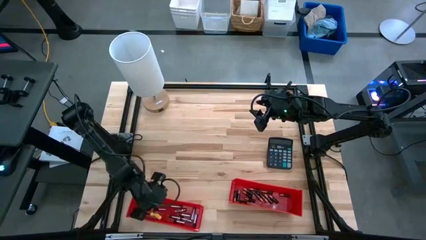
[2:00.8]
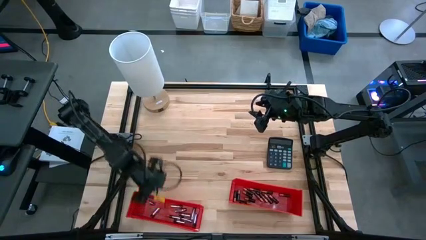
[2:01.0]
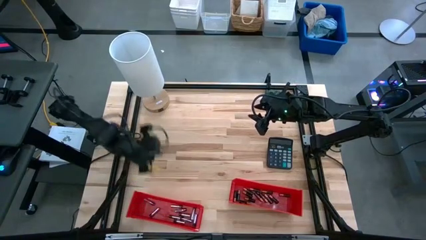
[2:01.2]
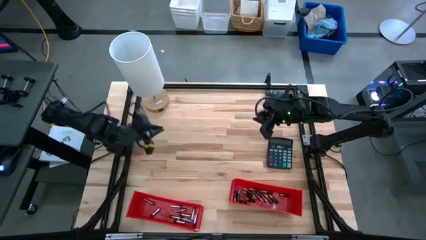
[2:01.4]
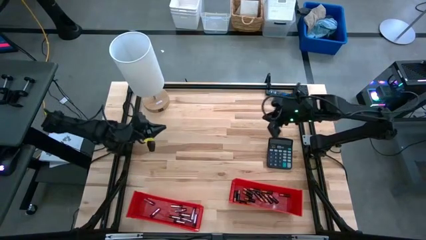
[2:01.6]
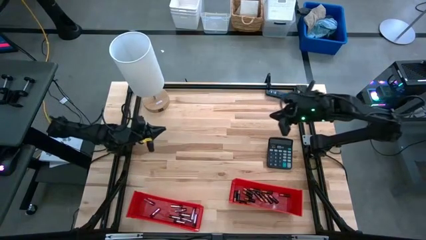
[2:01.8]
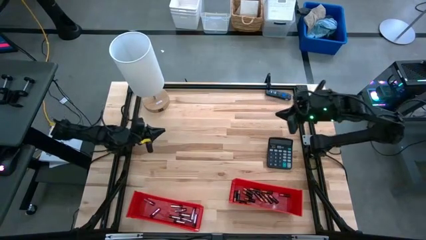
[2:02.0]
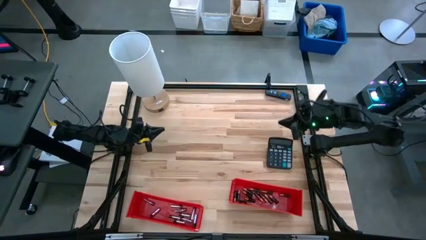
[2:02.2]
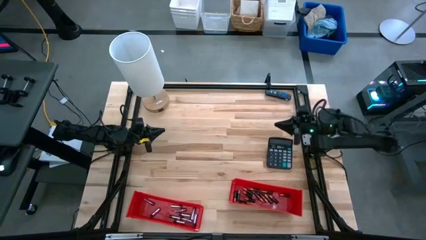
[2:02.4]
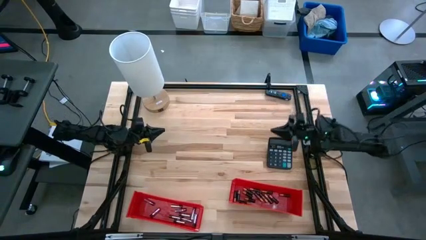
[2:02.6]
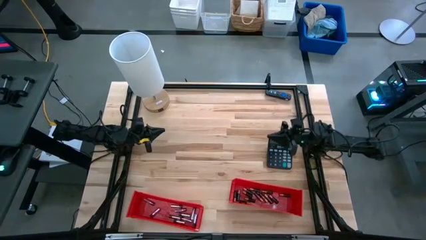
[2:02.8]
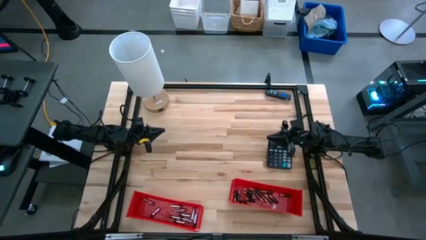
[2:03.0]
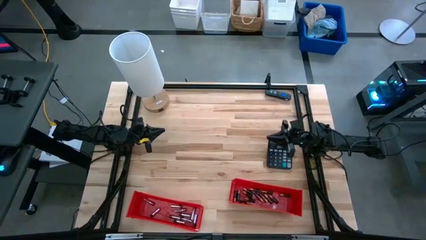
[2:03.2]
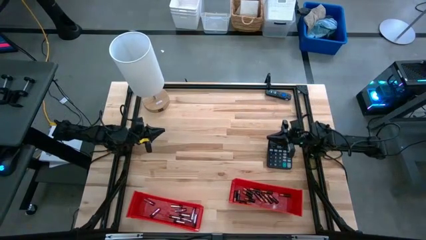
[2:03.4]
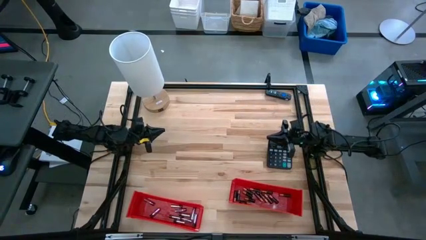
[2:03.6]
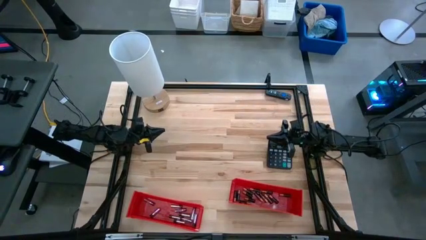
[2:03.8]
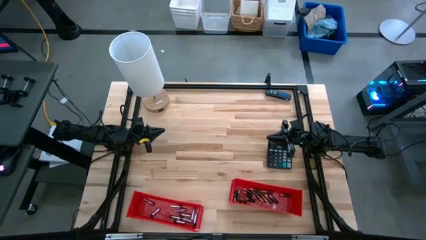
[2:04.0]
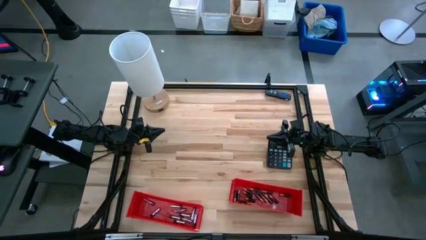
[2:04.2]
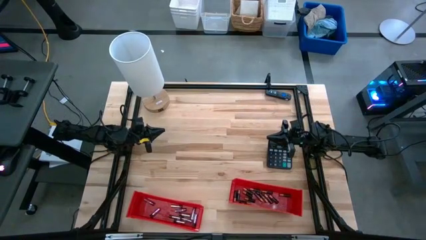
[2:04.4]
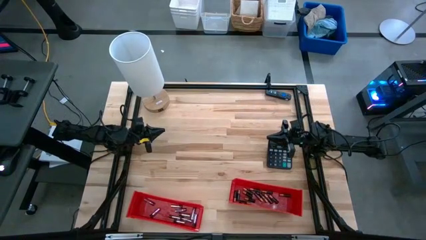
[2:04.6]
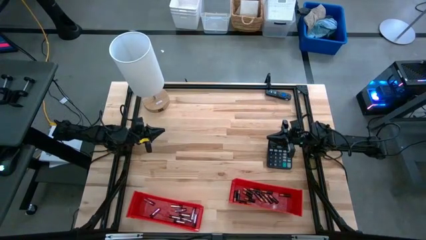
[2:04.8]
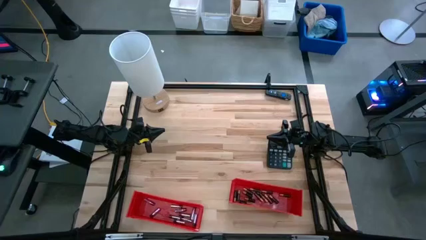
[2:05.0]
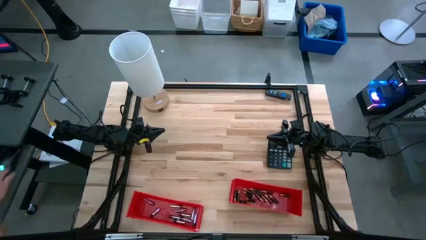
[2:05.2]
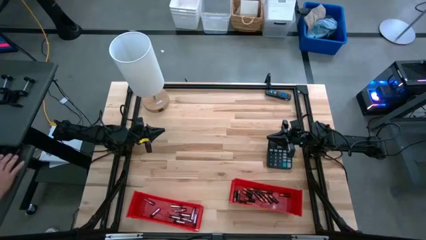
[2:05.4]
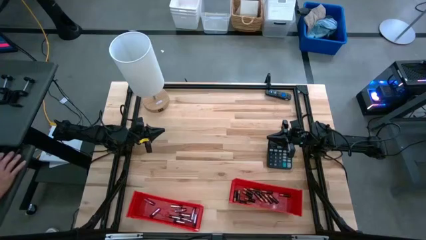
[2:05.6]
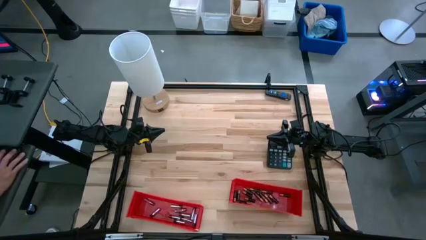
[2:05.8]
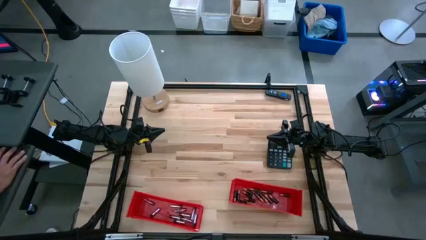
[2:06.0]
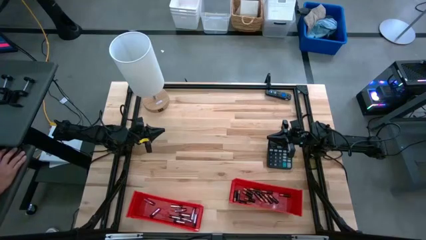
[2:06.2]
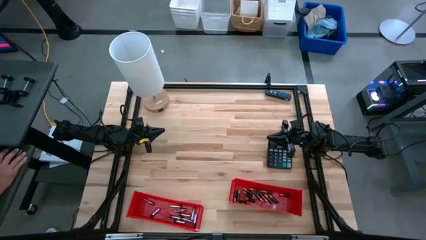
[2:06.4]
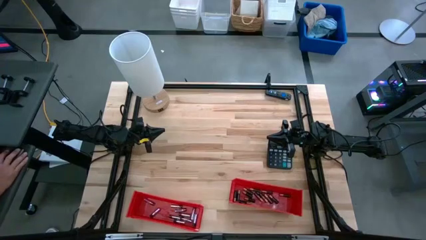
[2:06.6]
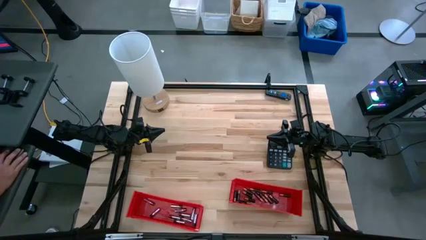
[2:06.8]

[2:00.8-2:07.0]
Task: Sort batteries
Return to Home Position

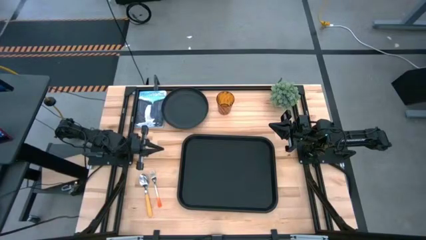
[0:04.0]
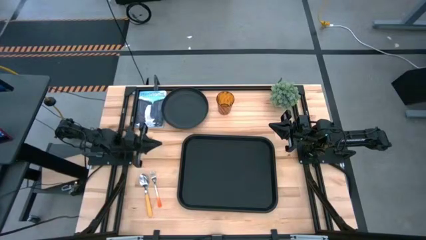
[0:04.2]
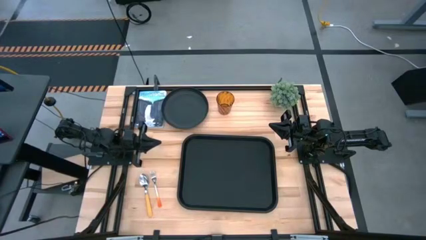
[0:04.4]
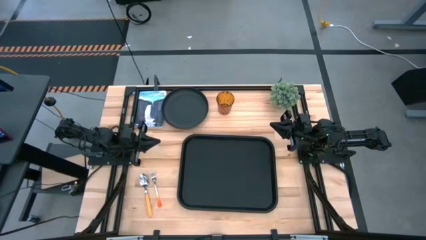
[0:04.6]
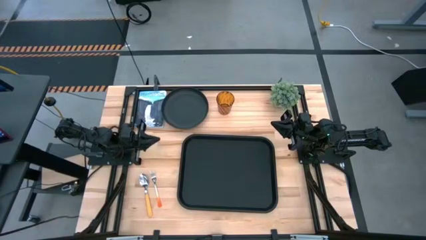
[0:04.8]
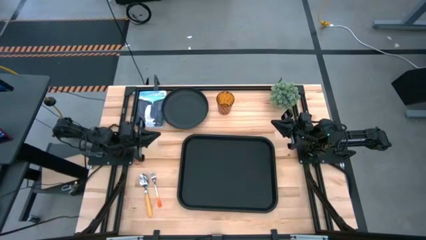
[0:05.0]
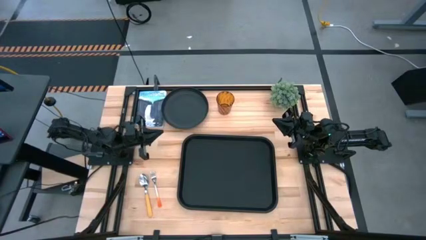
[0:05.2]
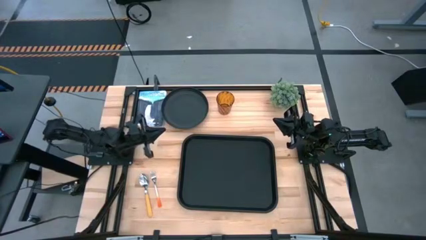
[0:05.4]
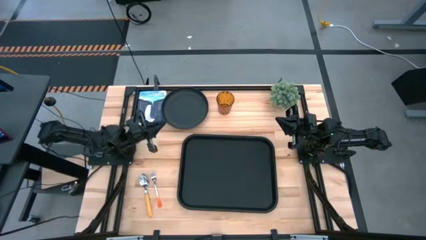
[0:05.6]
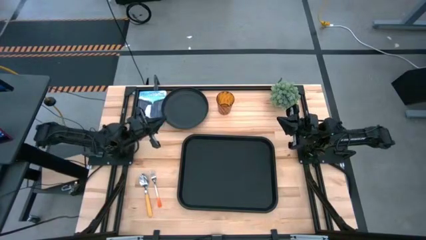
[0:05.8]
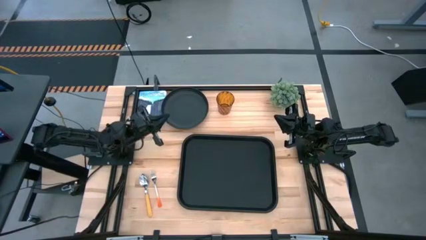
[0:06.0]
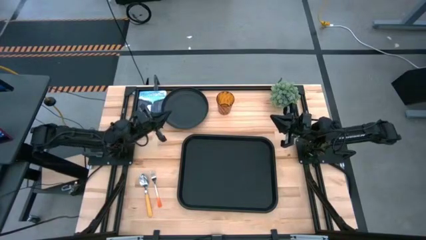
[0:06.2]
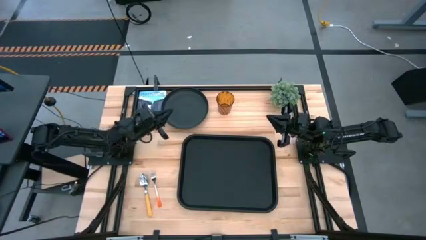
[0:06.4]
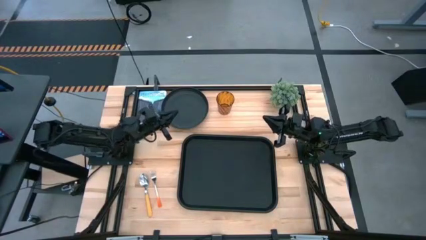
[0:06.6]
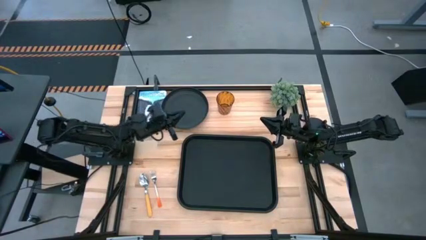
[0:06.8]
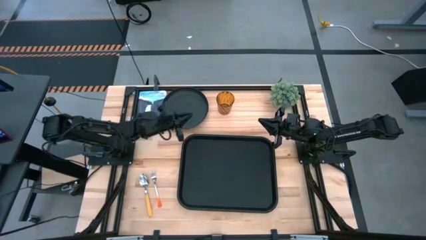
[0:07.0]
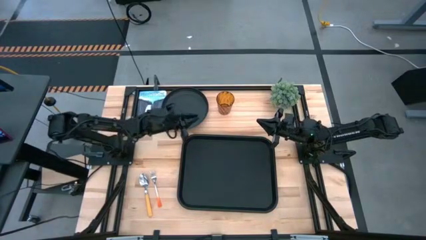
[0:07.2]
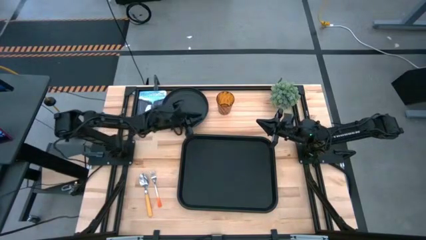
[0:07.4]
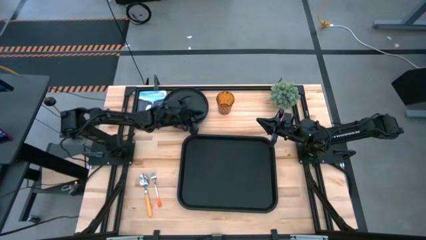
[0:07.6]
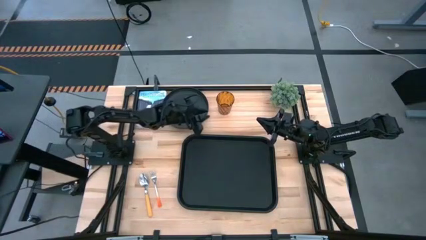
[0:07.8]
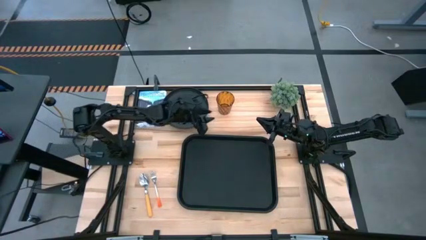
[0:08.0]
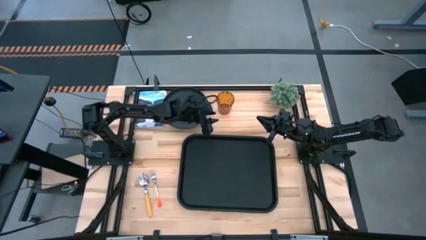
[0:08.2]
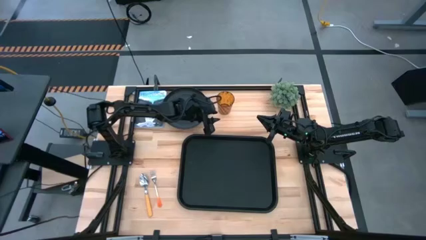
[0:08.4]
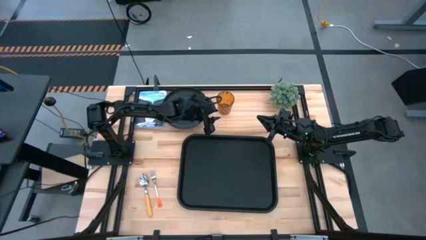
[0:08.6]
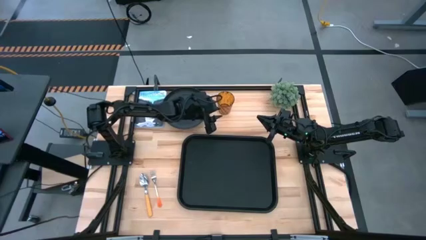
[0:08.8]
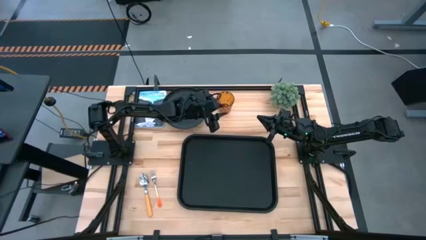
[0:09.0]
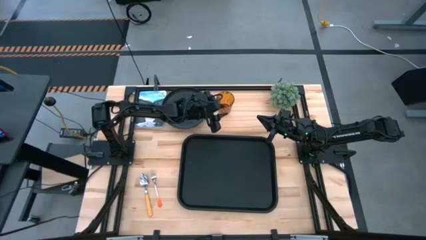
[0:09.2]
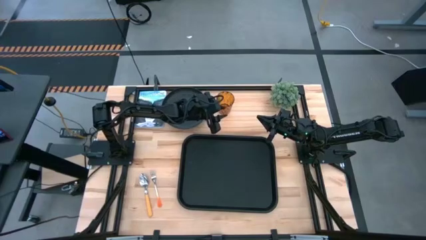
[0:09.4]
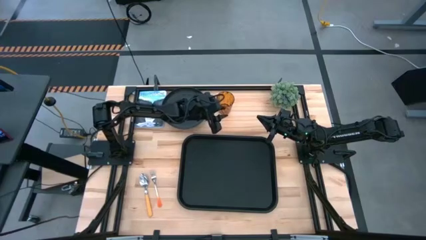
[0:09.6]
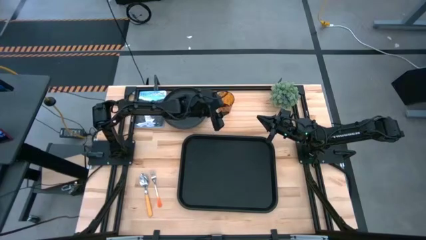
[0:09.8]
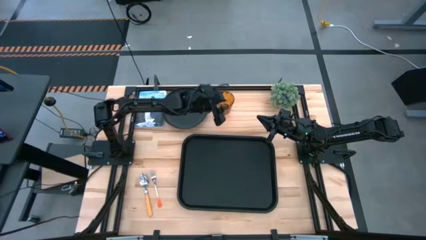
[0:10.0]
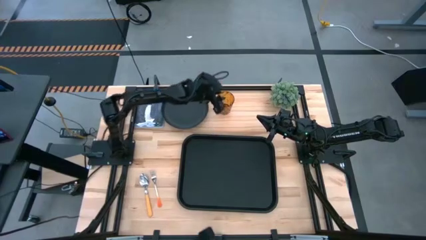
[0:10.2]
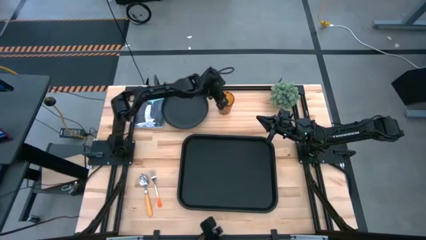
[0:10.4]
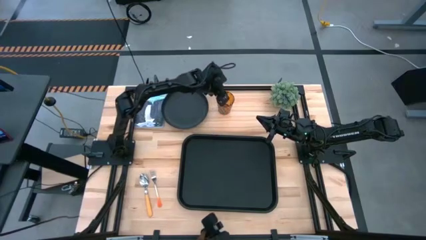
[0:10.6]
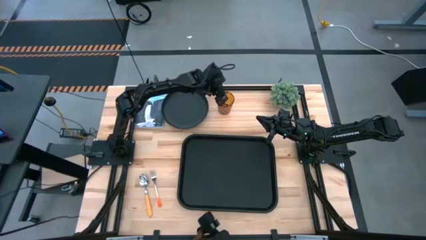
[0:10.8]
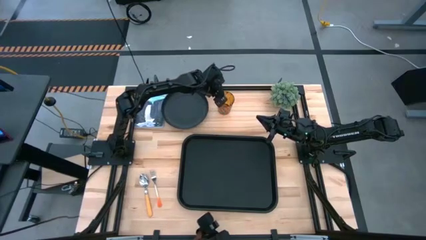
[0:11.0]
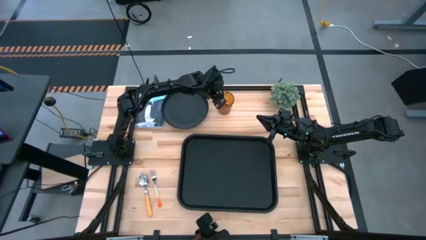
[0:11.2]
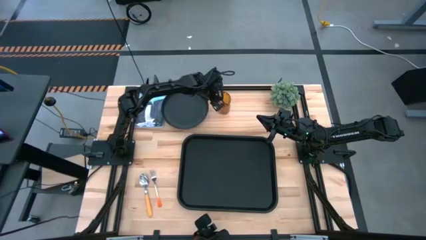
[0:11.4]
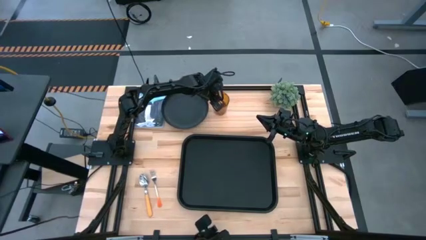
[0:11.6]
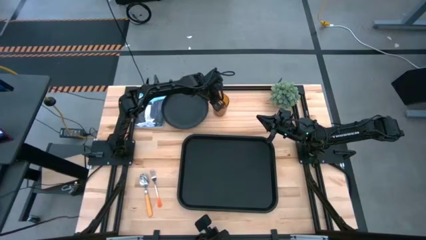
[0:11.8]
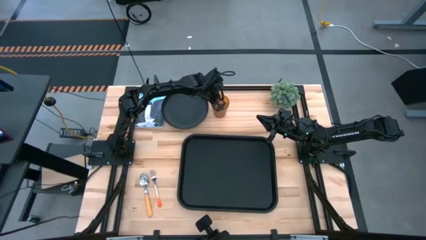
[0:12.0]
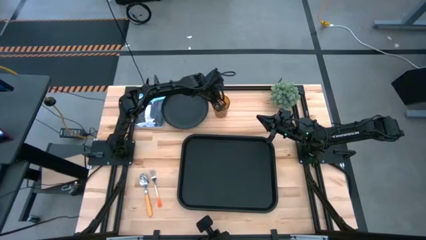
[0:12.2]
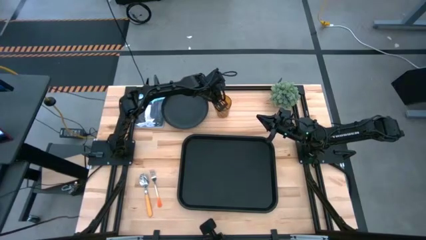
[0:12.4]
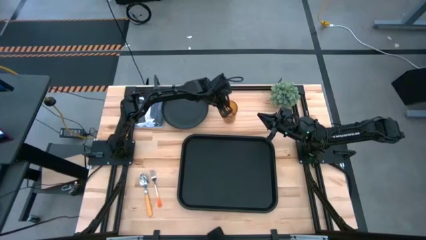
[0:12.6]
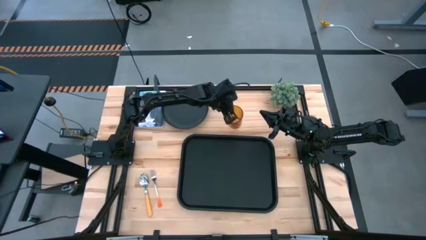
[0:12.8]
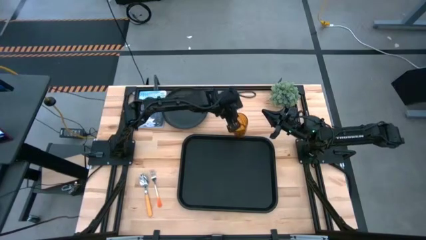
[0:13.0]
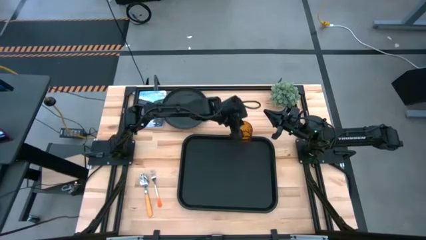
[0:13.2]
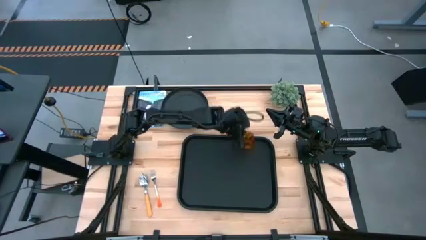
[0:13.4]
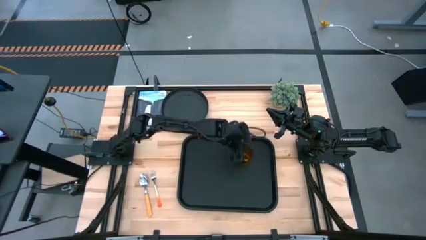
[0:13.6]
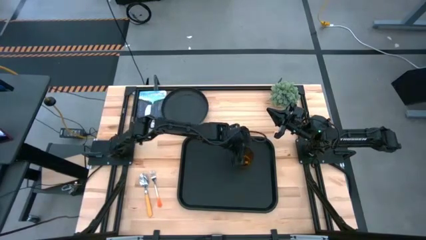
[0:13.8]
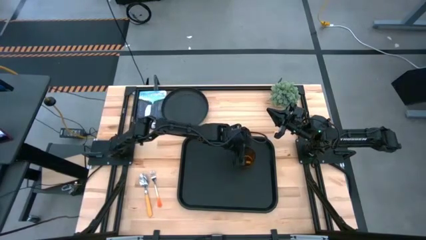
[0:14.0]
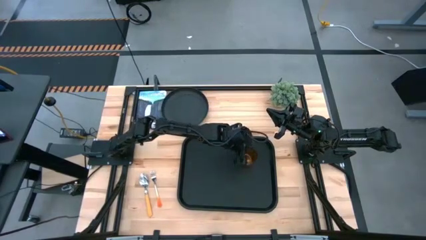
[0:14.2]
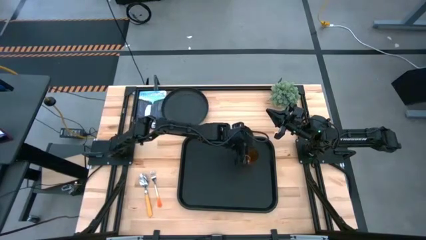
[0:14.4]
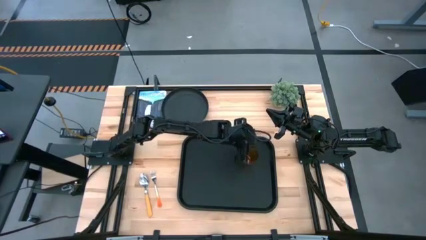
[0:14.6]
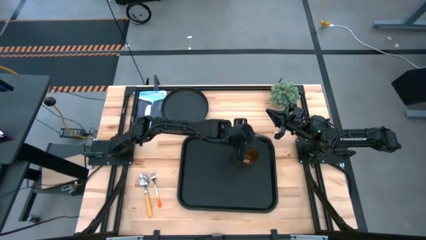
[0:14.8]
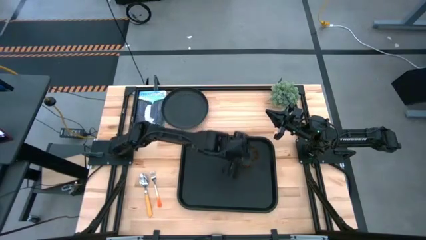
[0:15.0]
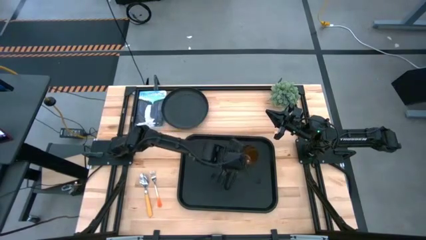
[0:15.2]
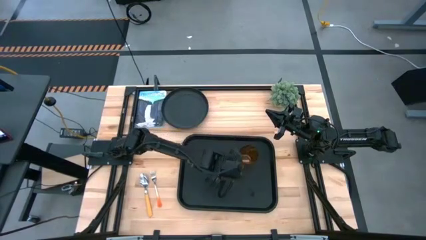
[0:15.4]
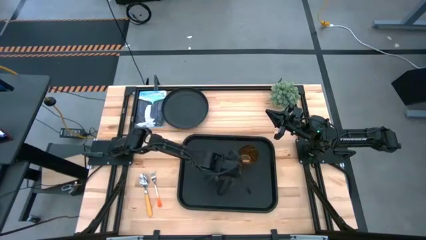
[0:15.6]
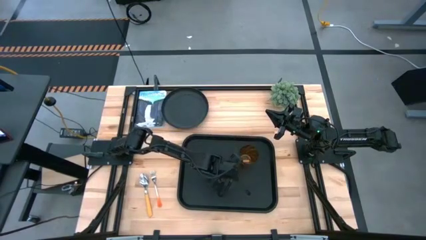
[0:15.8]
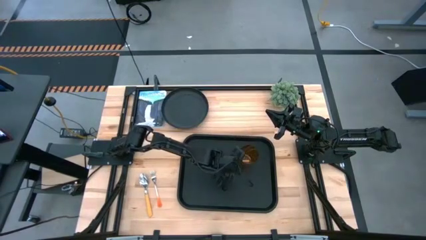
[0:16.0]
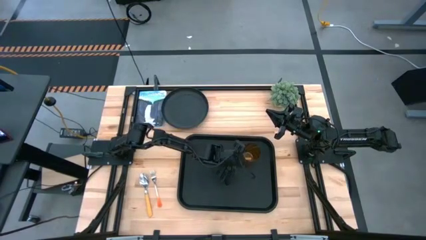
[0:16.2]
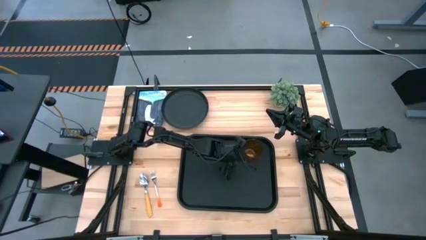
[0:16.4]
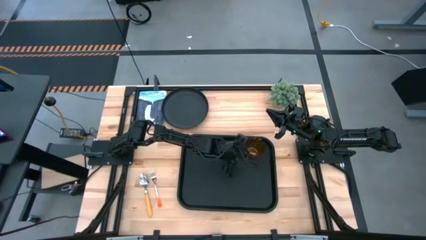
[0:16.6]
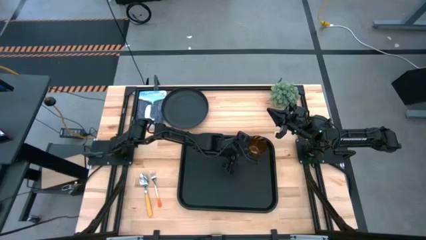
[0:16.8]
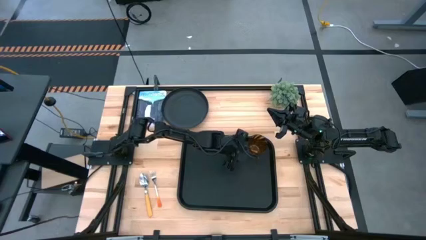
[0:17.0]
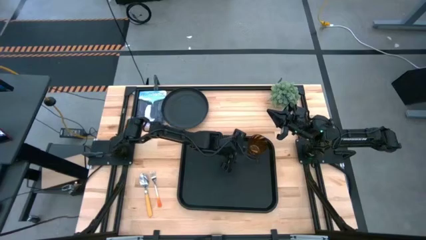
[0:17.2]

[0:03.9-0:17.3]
Task: Pick and place plate/cup/fork/spoon on tray
Put the brown glass on the top right of the black serving tray
